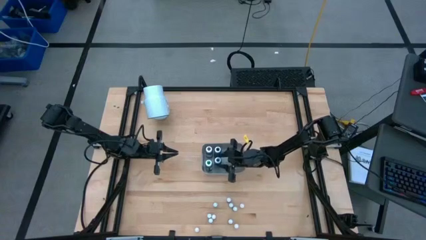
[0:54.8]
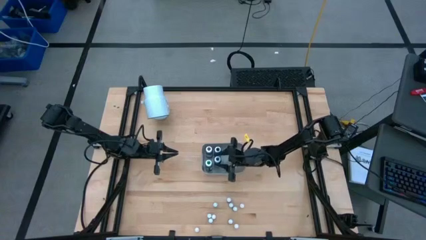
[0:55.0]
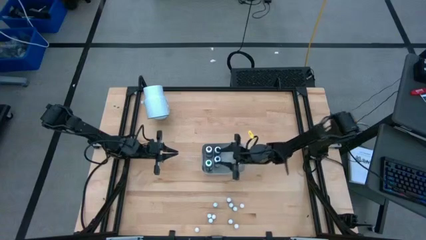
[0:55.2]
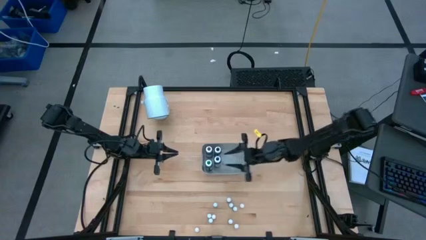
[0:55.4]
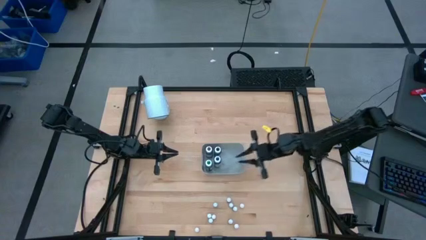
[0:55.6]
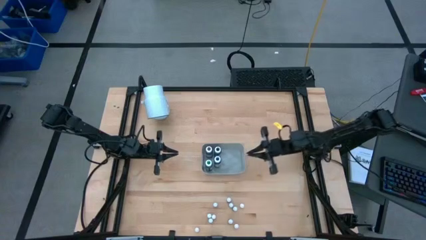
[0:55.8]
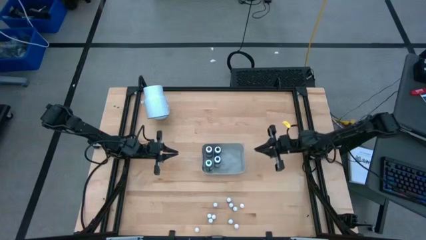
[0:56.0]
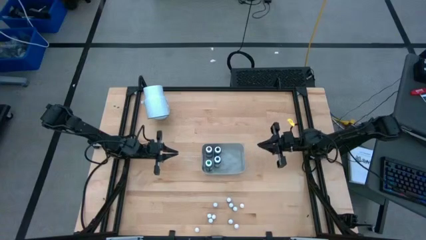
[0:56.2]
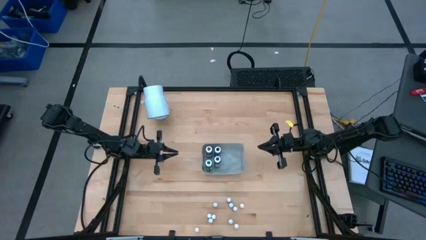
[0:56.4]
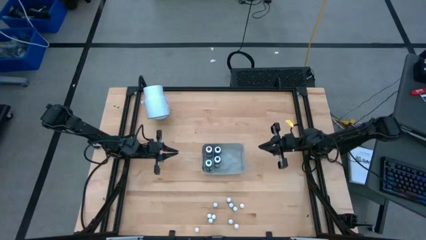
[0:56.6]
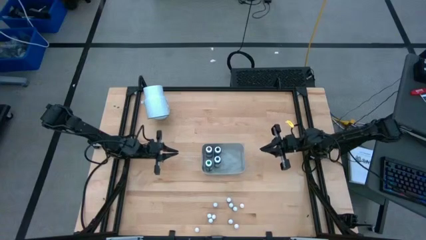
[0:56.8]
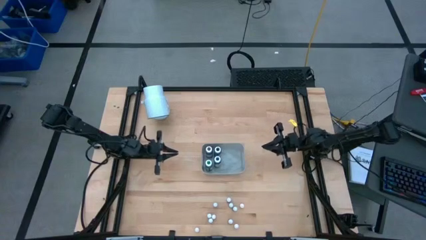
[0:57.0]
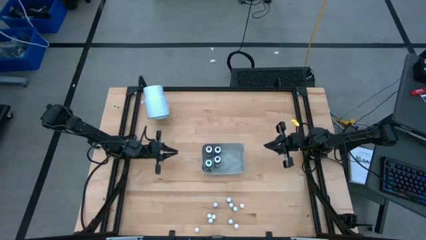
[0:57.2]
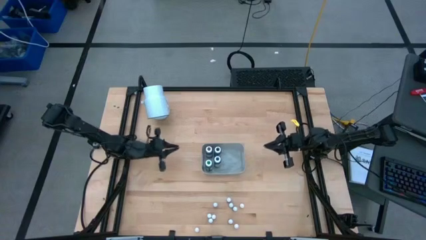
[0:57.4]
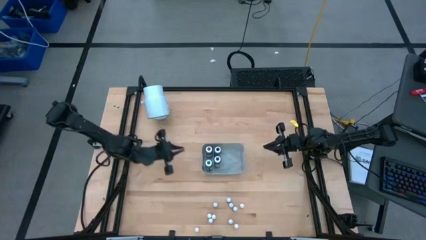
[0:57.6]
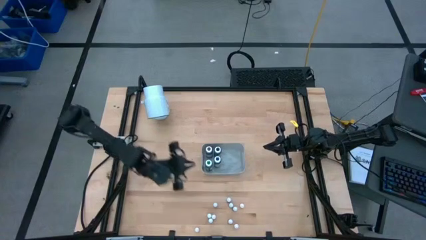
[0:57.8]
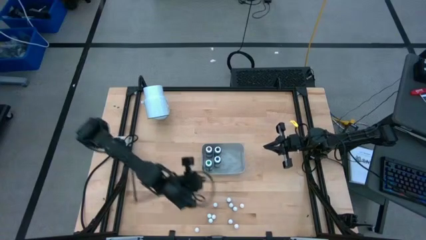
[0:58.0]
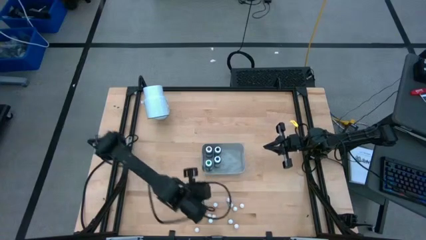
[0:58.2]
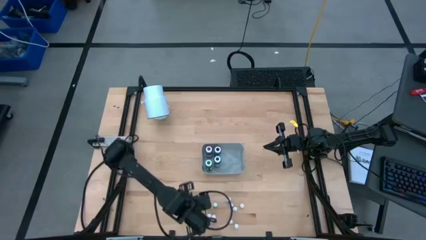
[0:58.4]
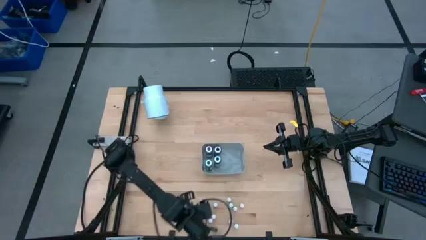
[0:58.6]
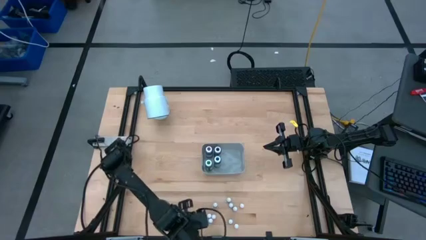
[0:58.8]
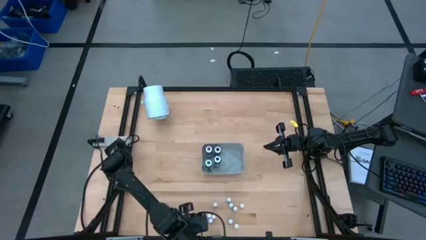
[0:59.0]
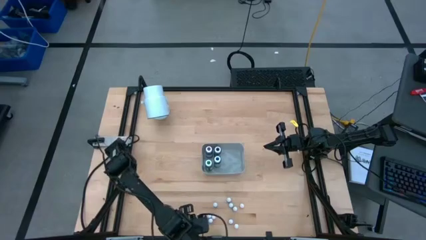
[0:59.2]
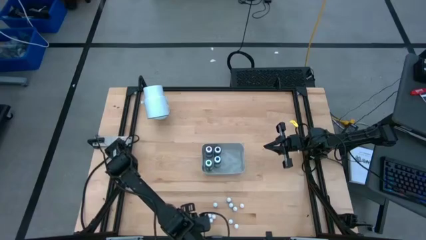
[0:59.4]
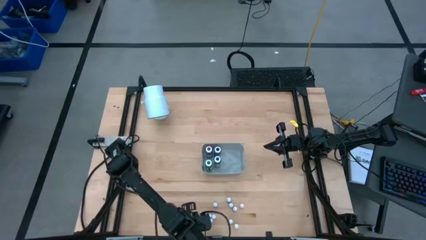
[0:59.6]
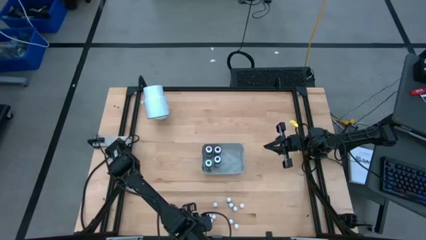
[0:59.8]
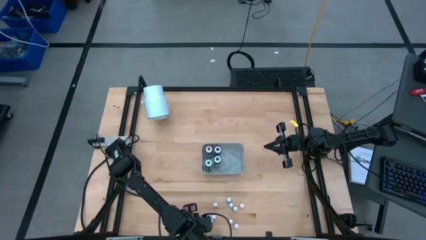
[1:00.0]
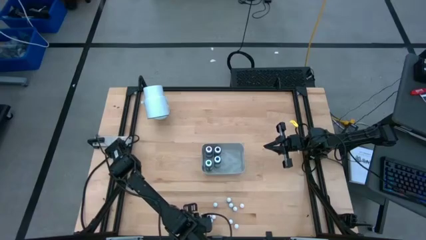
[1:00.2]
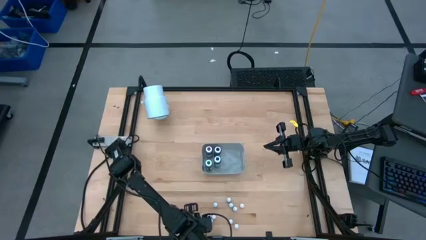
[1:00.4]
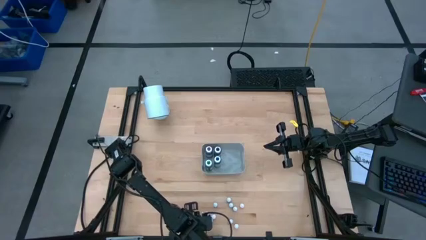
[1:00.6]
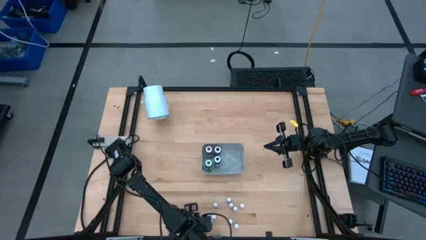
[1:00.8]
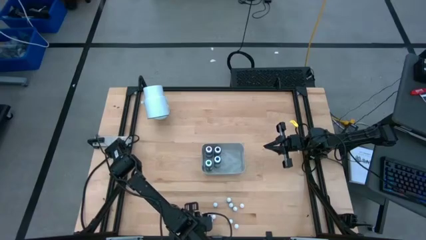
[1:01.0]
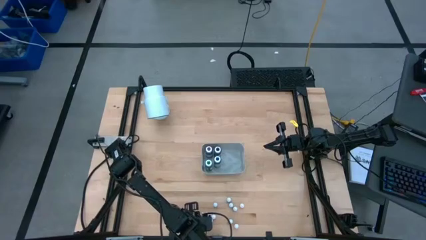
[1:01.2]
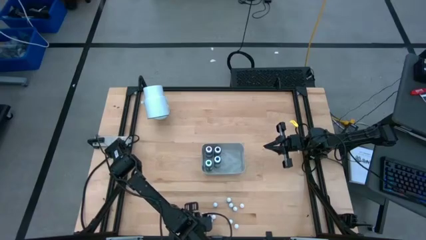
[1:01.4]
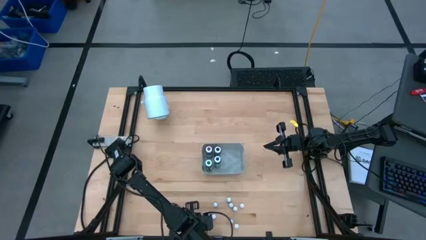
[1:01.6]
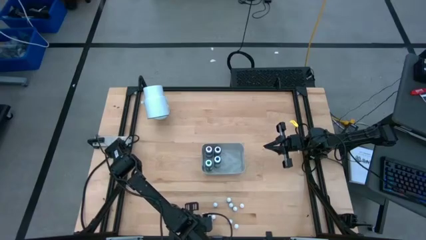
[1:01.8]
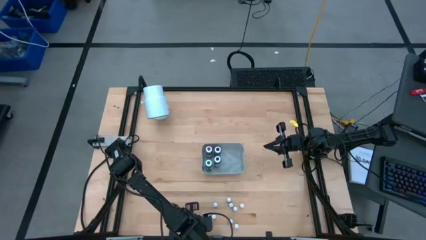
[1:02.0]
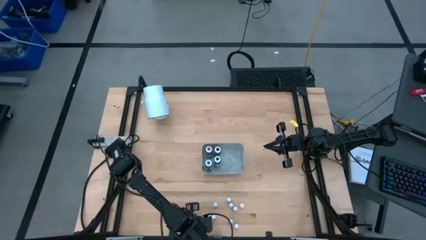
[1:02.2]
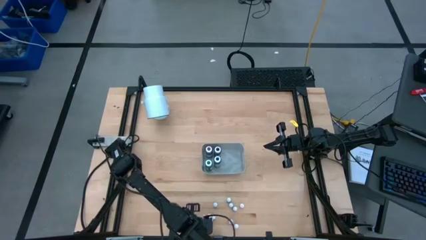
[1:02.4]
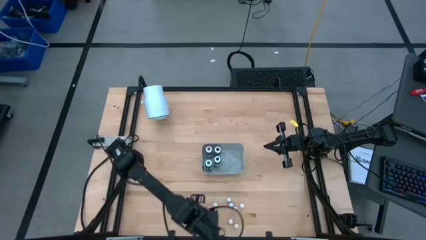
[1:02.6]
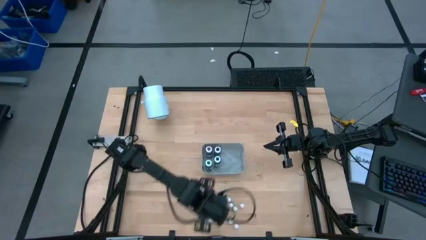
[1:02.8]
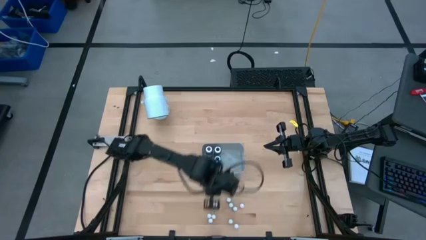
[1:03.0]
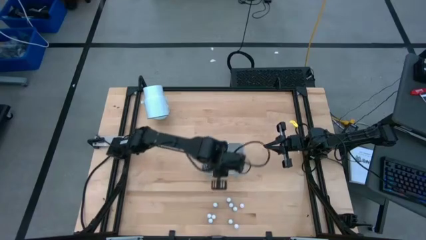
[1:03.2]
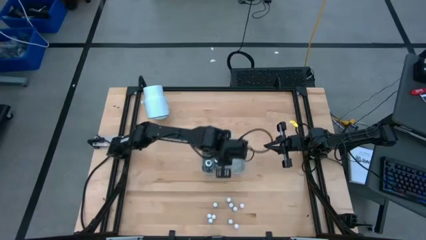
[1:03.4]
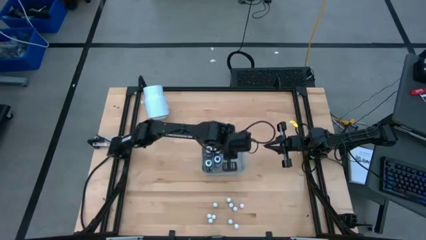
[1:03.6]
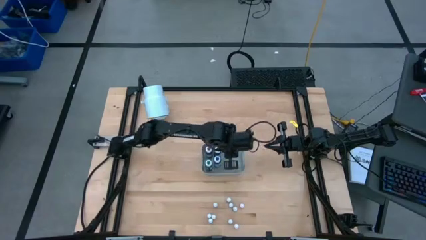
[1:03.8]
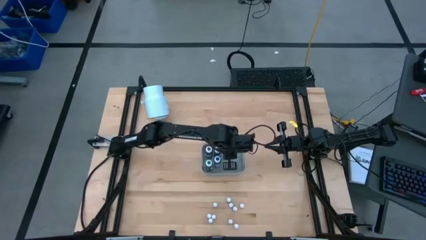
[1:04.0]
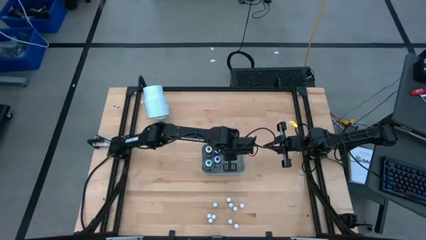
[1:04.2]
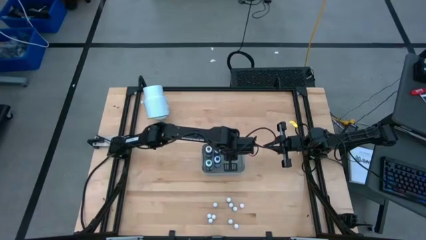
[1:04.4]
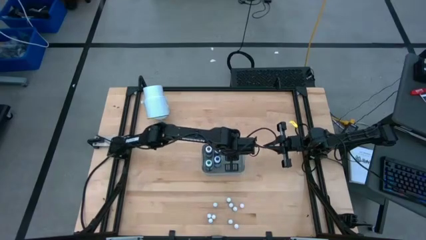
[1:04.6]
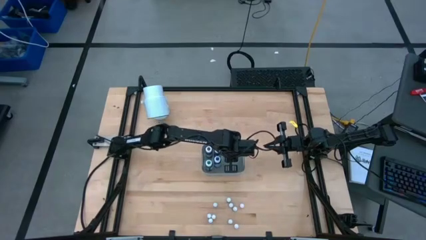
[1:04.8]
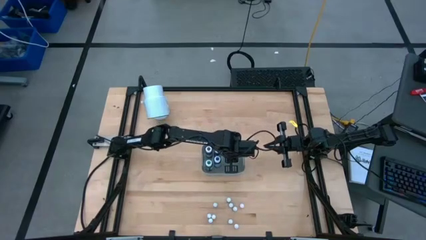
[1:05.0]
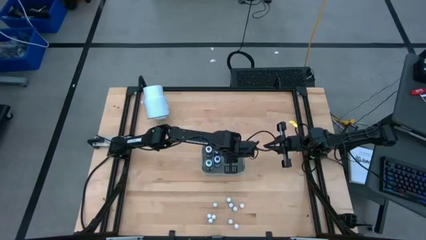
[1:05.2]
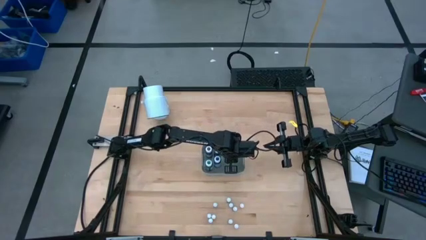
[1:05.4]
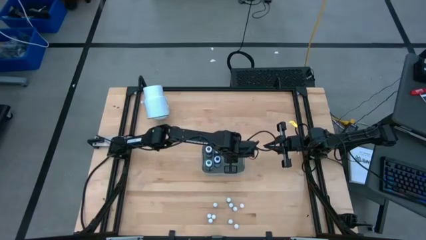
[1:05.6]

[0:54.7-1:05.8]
Task: Pick & Place food coloring
Put the small orange food coloring bottle into the bin

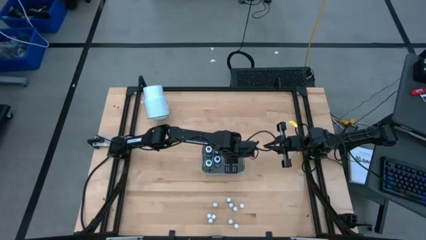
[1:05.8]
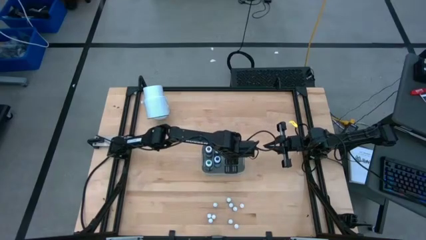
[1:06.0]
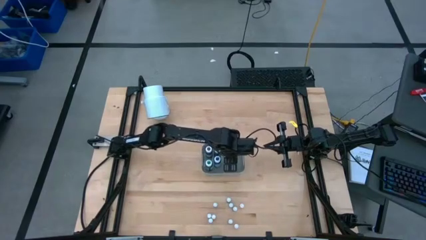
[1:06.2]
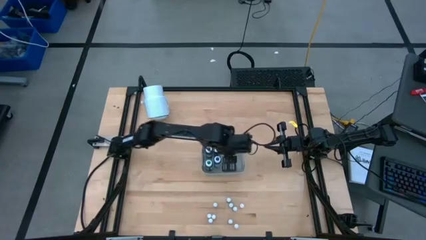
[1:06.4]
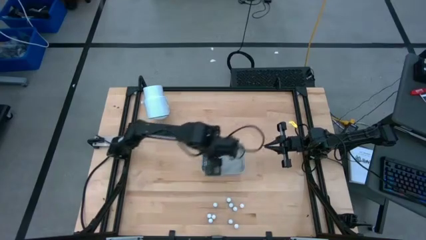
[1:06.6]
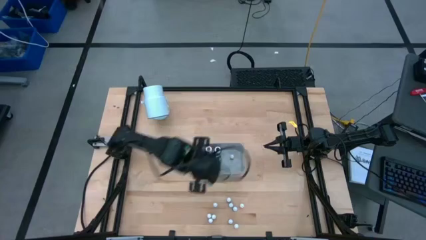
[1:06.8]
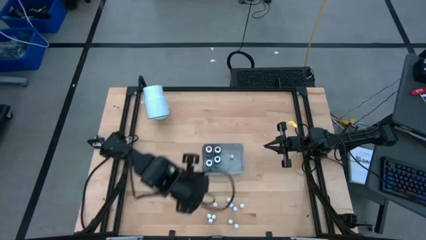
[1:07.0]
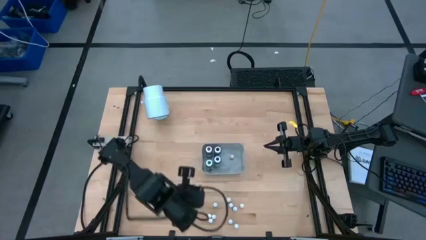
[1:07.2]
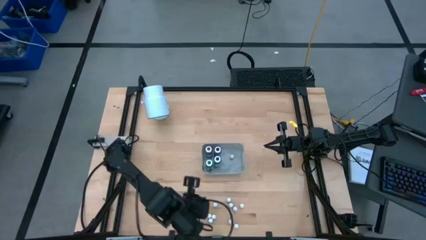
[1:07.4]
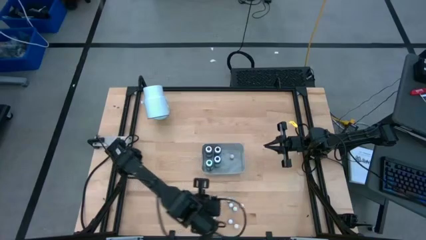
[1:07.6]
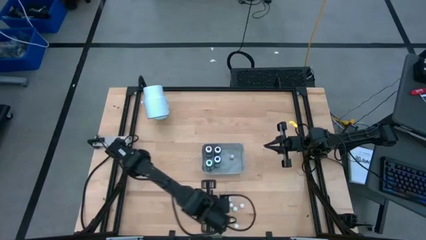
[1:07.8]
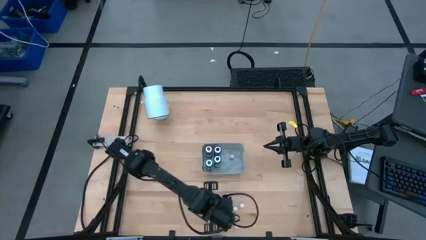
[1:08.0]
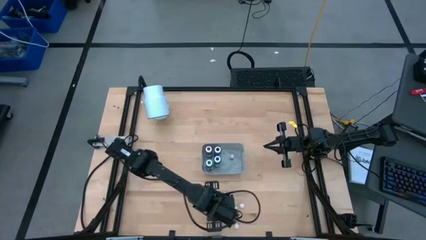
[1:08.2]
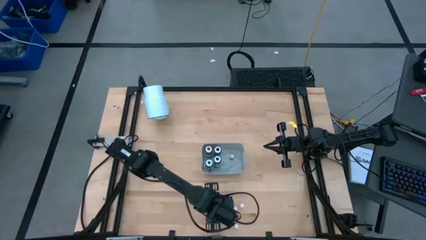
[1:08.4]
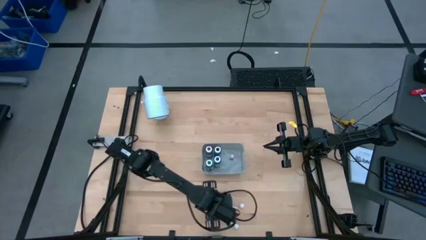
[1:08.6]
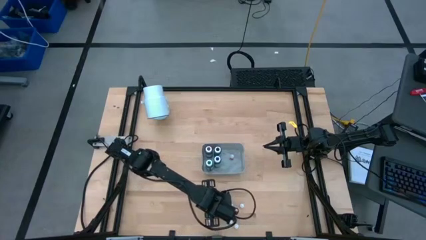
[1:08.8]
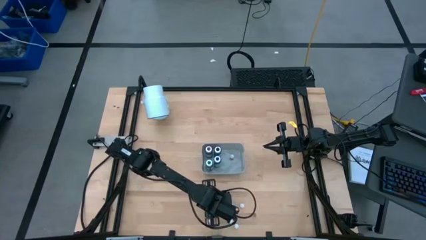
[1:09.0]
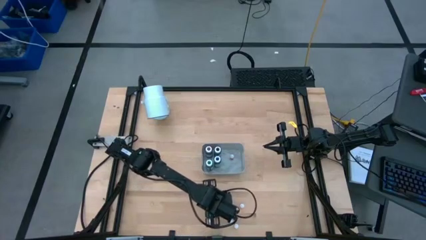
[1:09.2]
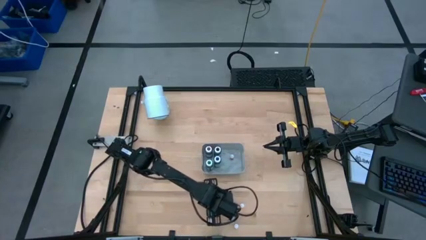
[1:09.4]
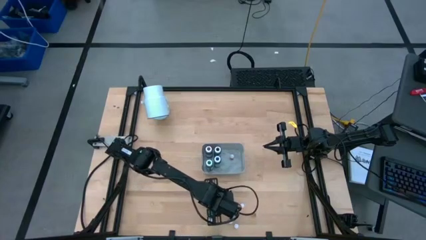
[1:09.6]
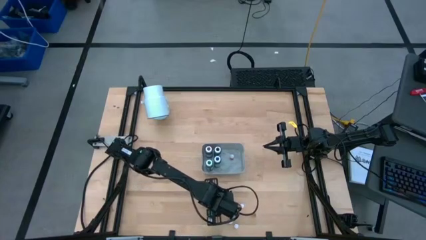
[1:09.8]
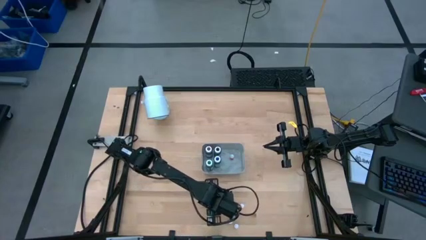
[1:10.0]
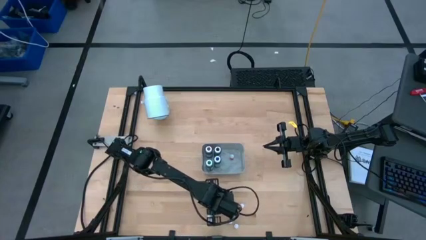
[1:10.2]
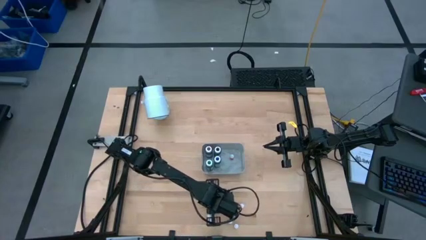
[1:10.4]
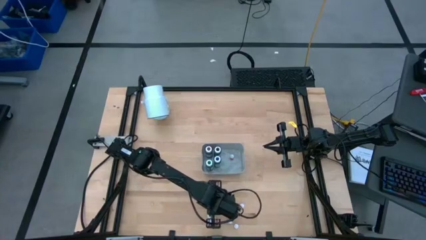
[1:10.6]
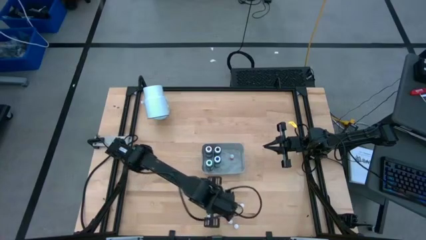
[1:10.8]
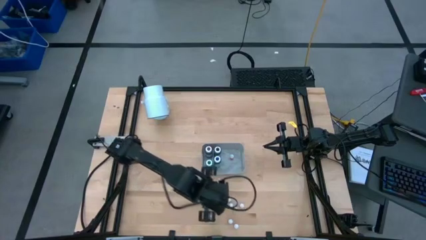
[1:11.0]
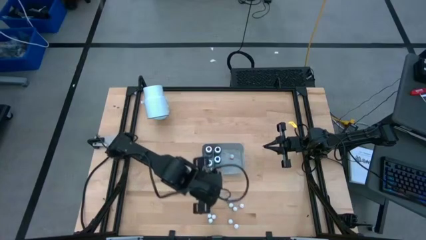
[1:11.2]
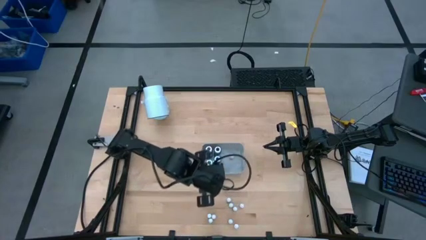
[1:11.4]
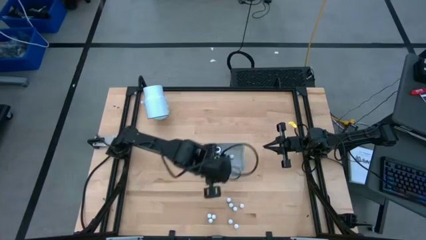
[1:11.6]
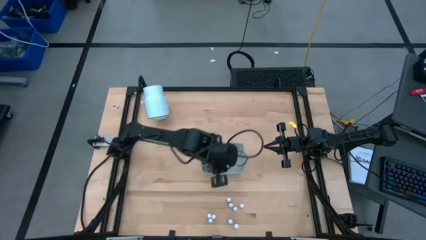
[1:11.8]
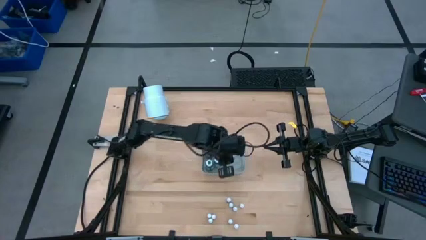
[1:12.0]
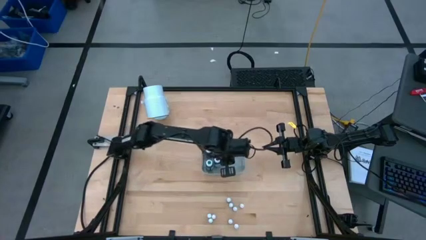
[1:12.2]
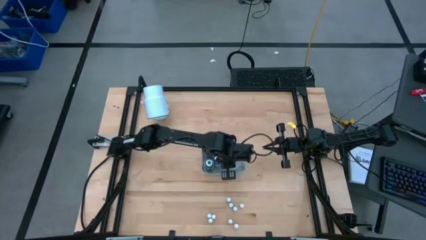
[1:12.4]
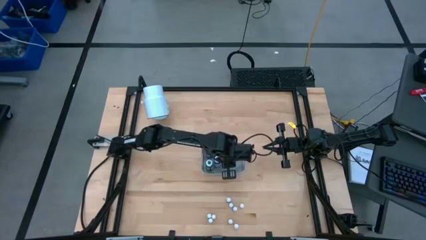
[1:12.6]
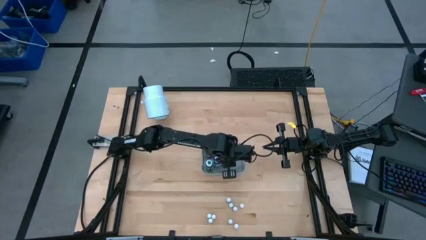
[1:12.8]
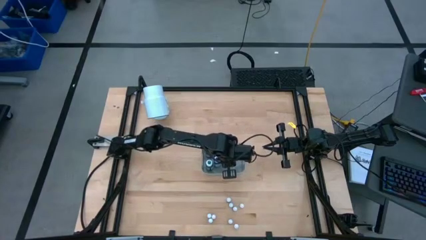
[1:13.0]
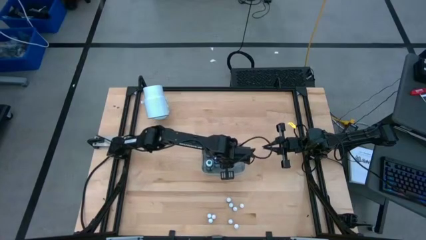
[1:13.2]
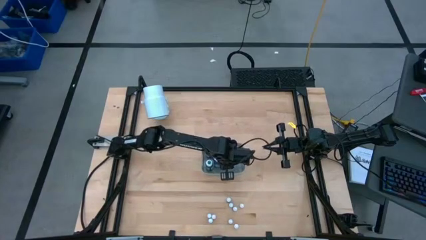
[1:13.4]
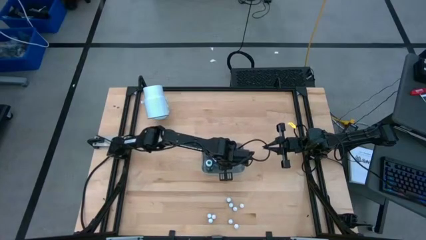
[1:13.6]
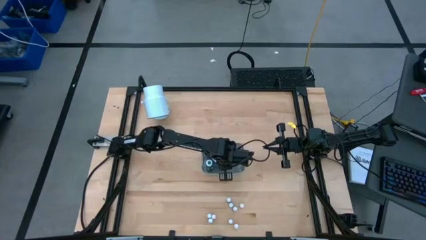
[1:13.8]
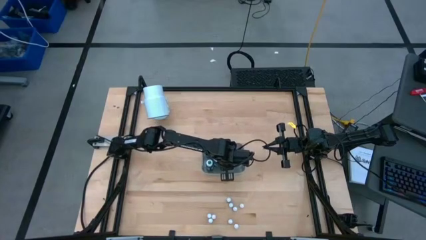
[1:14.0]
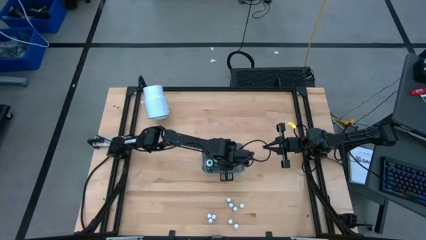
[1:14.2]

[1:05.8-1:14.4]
Put the small black food coloring bottle into the bin
